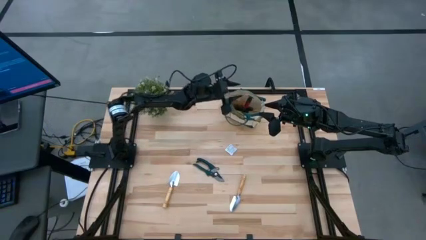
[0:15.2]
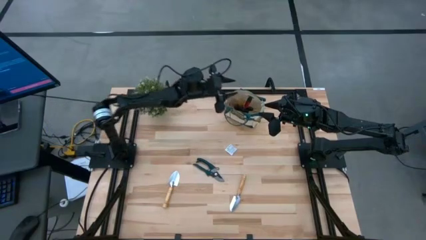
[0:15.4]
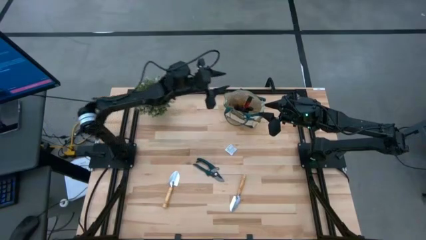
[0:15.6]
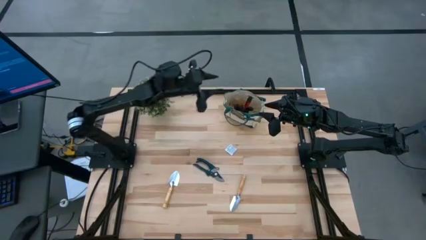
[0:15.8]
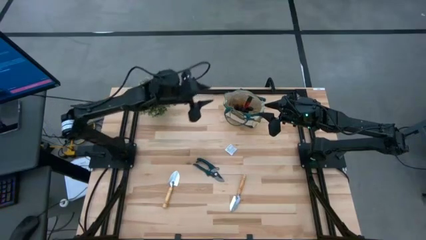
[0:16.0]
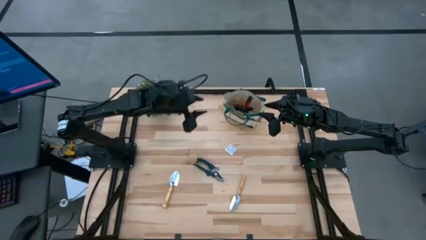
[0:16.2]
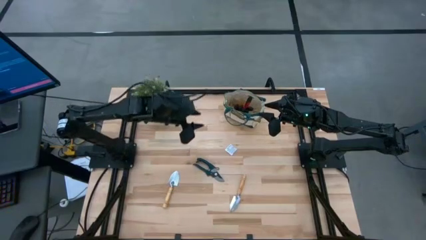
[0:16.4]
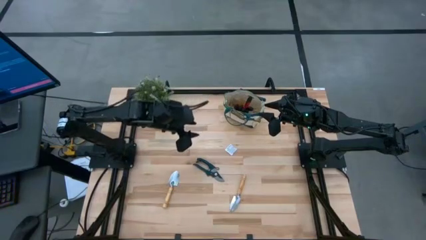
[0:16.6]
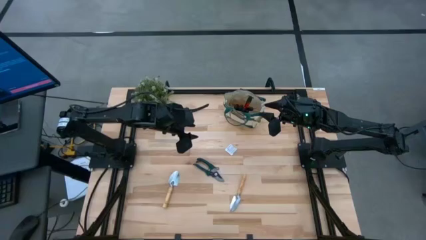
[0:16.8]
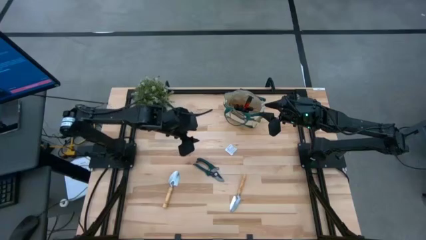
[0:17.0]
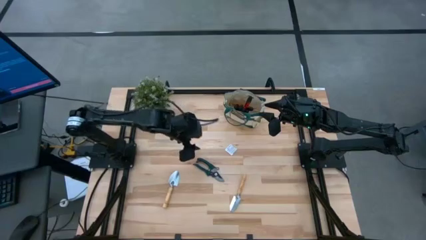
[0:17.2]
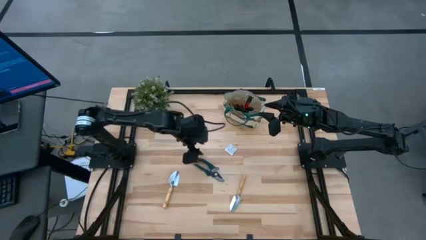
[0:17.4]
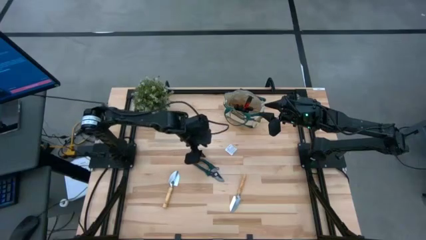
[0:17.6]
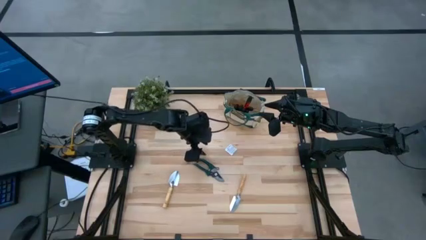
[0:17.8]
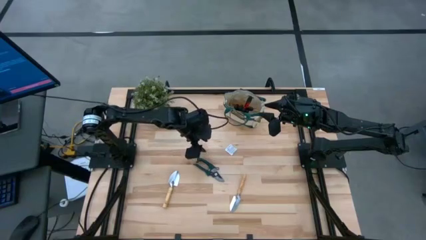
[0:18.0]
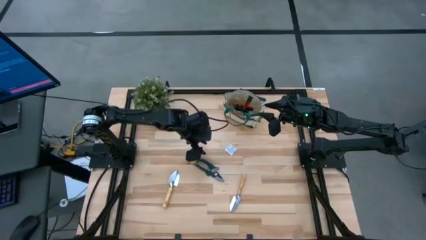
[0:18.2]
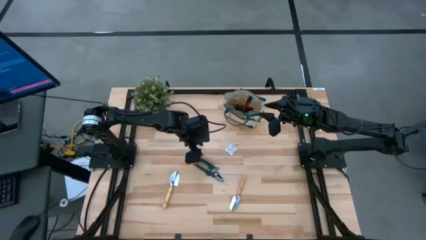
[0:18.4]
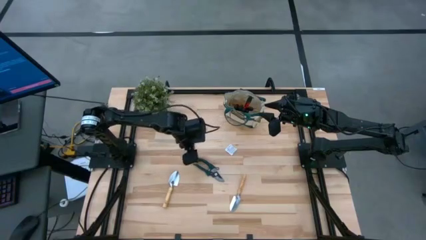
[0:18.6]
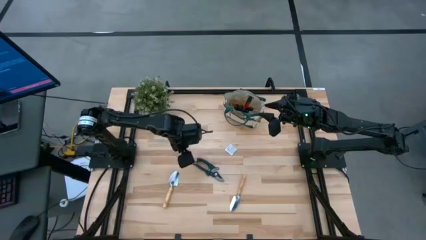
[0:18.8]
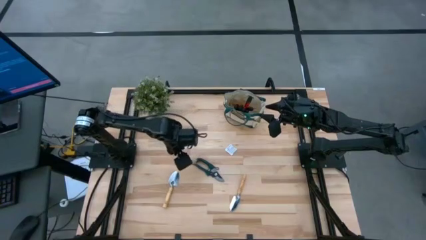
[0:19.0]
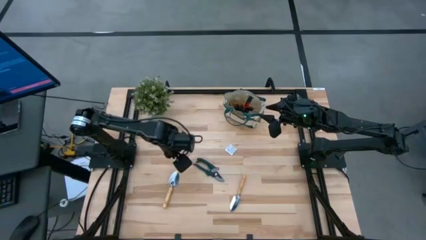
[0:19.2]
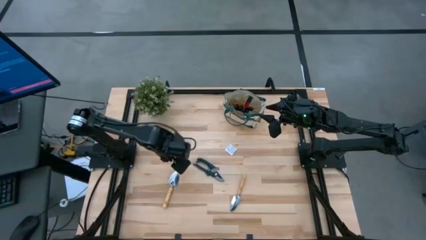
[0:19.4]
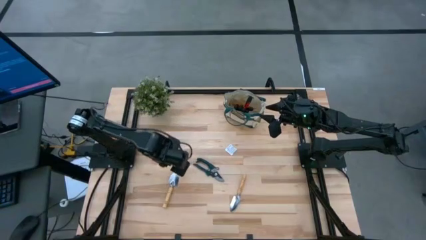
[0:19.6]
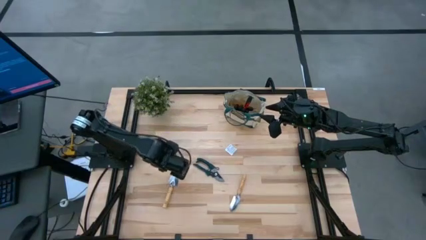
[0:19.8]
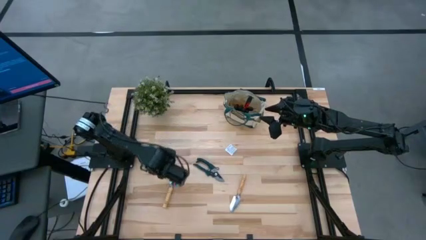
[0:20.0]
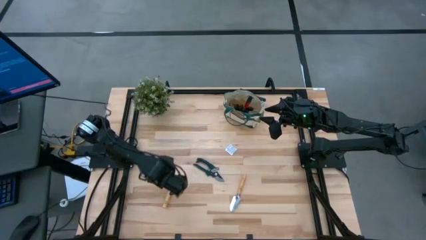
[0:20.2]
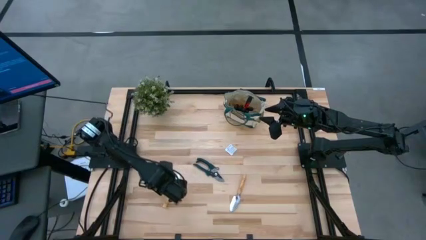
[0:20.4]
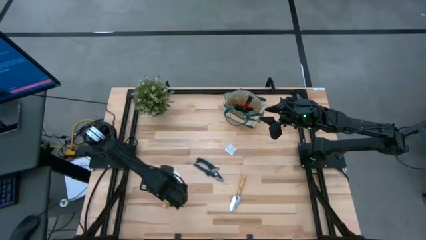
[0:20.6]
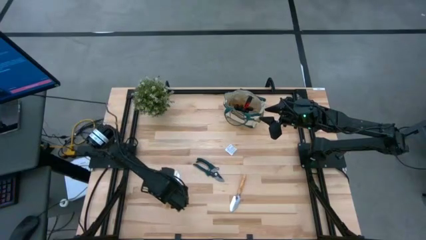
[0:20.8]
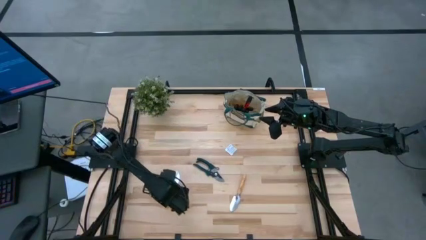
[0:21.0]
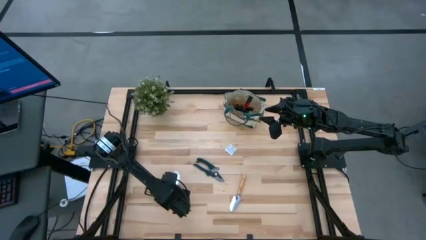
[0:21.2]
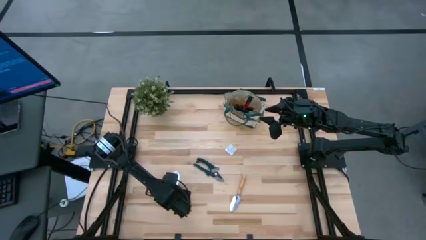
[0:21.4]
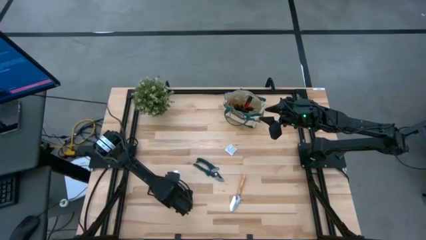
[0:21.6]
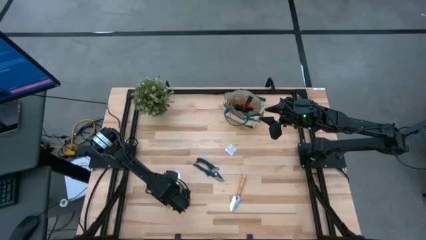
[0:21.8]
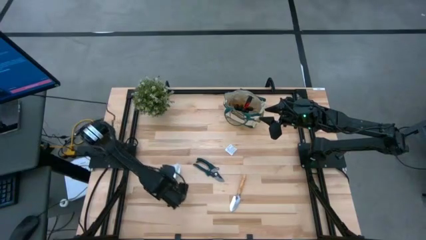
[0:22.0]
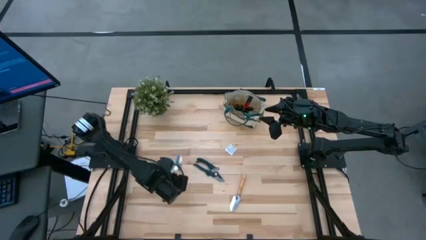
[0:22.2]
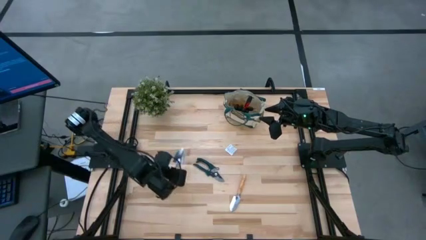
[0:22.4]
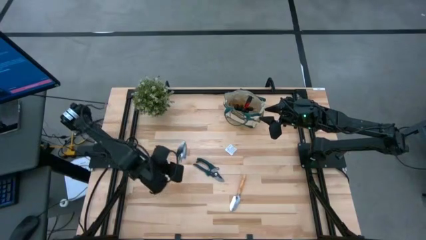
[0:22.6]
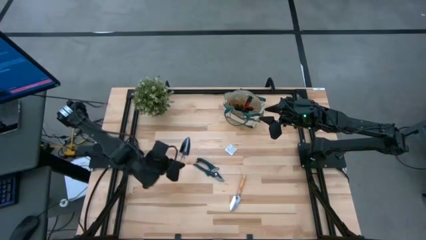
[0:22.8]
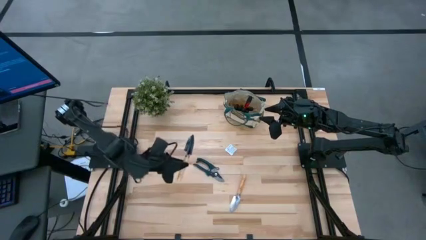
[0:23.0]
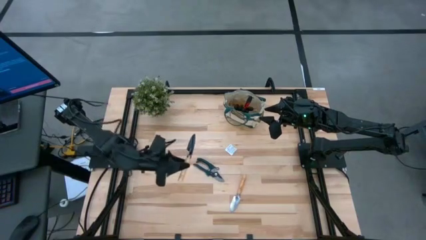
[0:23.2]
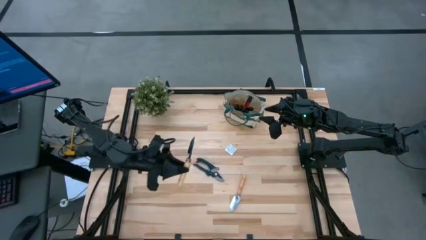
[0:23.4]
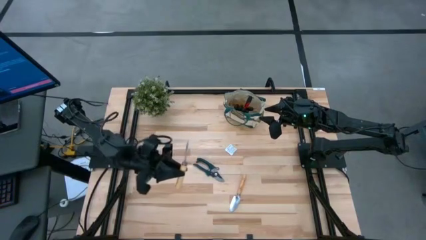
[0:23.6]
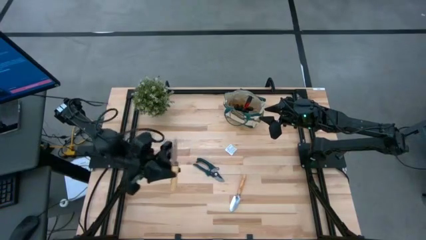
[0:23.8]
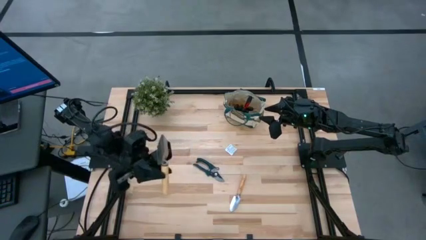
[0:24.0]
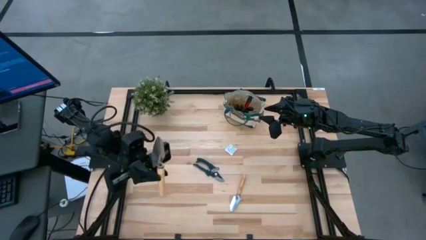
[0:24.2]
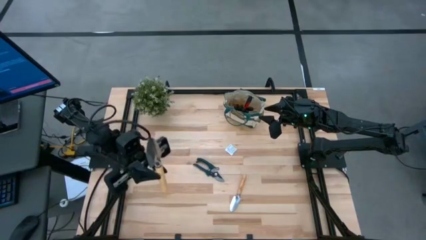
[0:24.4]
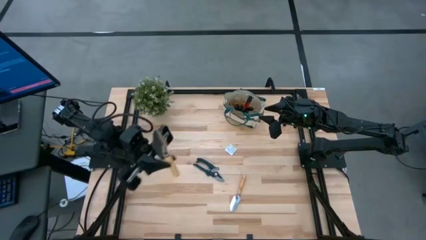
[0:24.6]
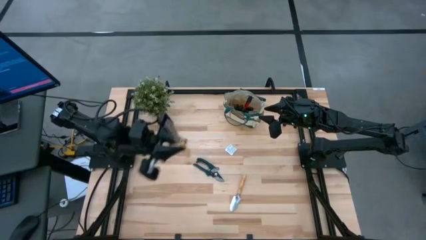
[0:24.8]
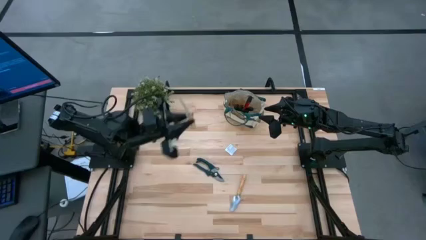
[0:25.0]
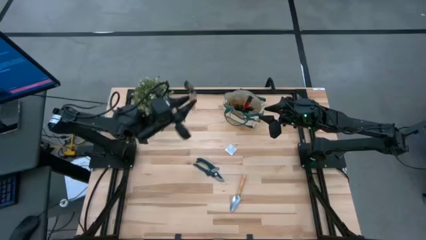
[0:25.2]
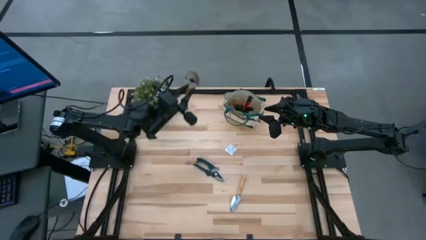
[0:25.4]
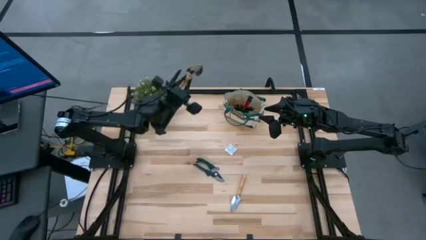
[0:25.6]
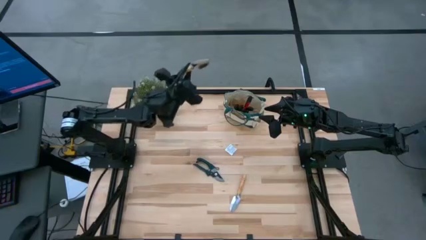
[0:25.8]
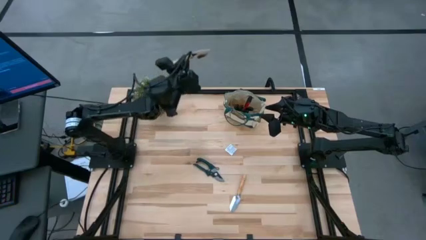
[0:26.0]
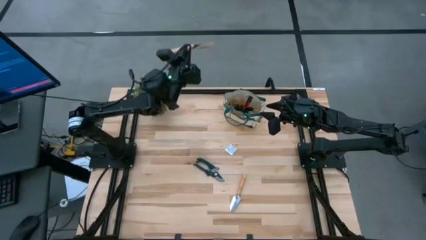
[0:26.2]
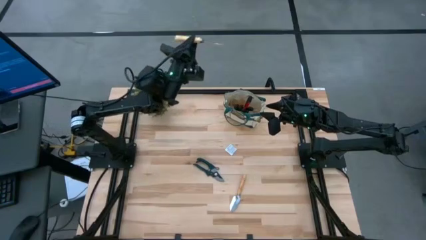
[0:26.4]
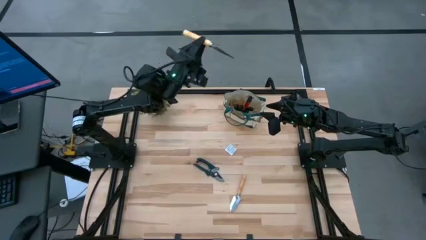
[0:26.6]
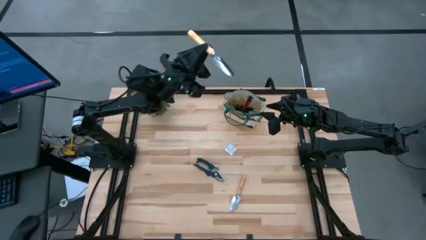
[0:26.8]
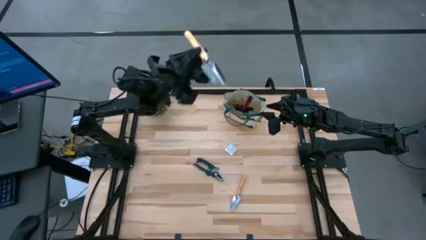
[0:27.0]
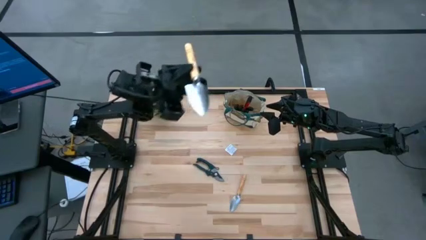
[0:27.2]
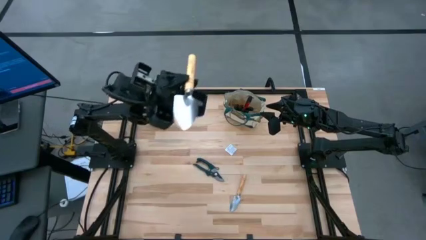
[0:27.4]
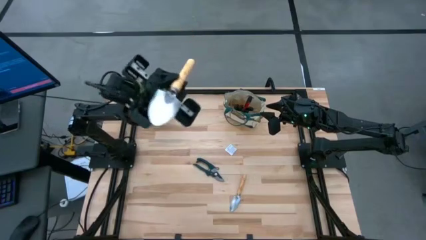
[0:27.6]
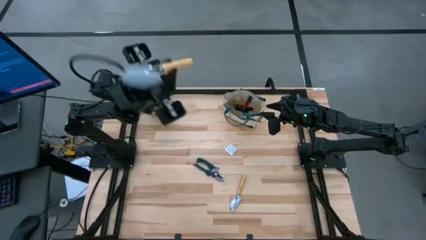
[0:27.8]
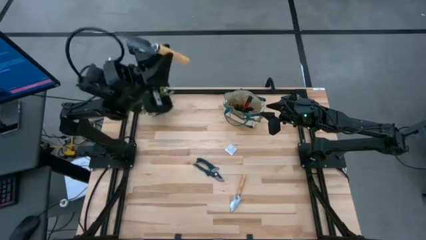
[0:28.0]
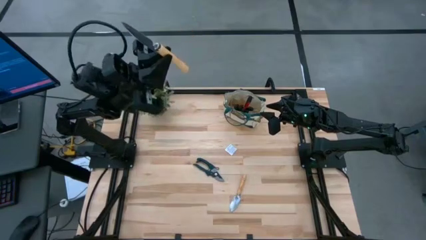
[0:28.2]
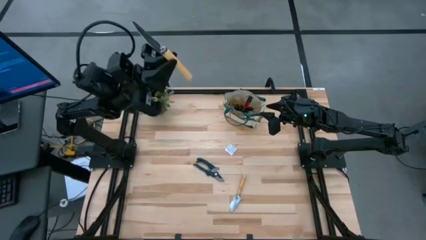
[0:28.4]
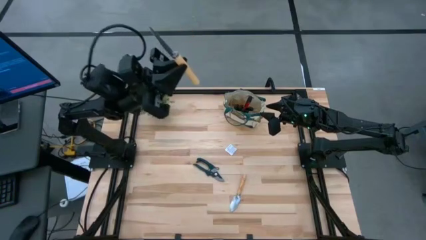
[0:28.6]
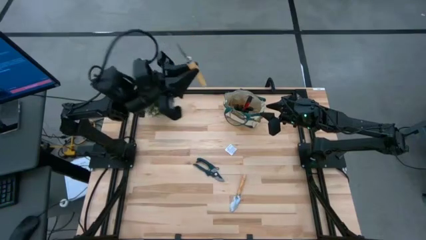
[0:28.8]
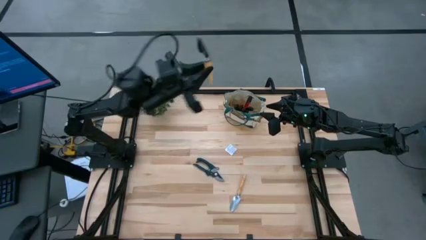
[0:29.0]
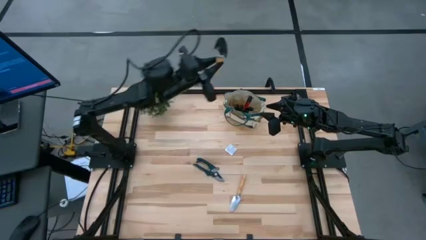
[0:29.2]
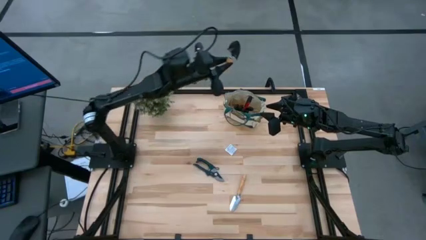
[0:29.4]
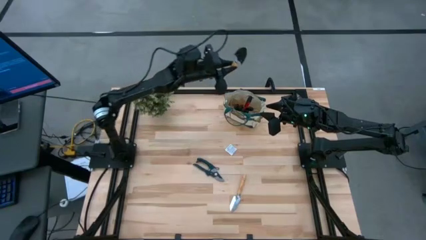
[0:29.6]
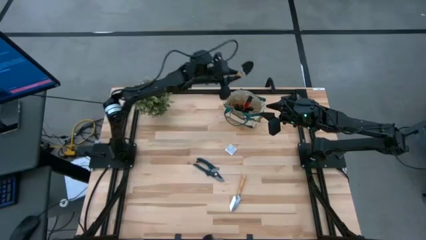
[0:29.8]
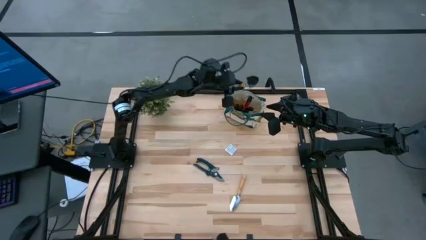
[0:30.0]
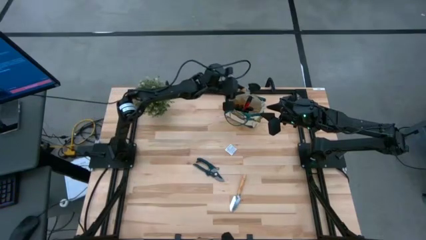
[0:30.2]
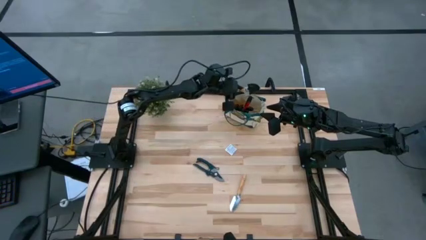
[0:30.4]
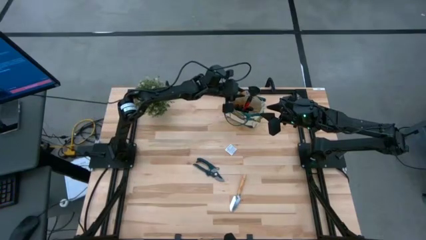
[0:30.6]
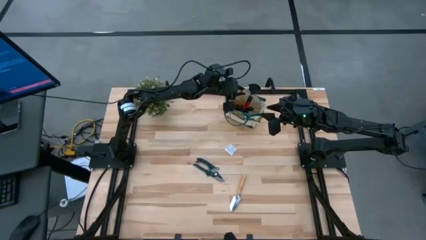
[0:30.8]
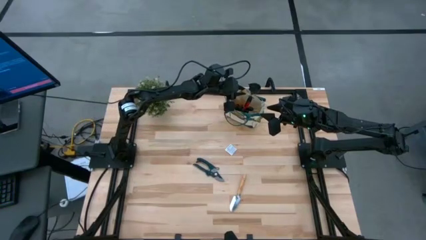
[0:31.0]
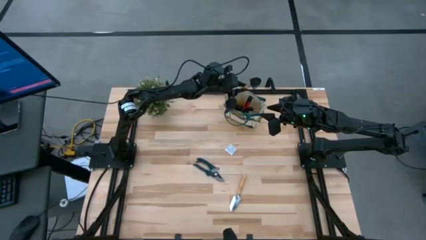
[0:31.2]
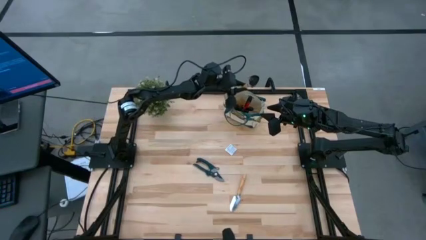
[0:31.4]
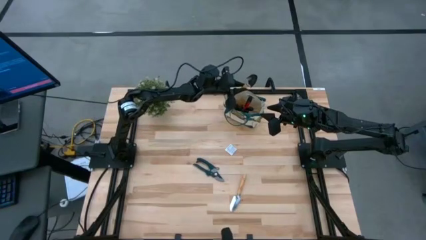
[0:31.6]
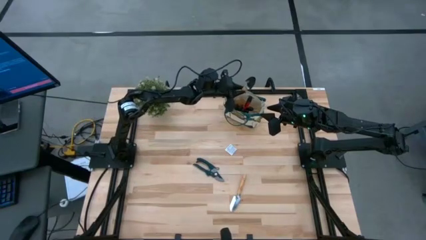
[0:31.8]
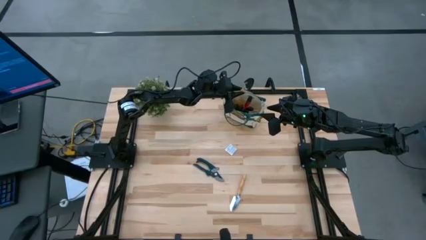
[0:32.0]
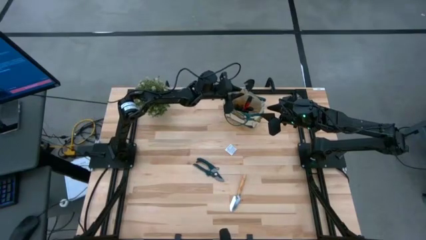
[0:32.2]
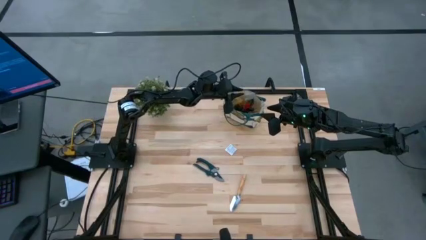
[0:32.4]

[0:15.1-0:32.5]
Task: Pick & Place Garden tools in Gardening bag
Put the left brown trowel into the gardening bag
